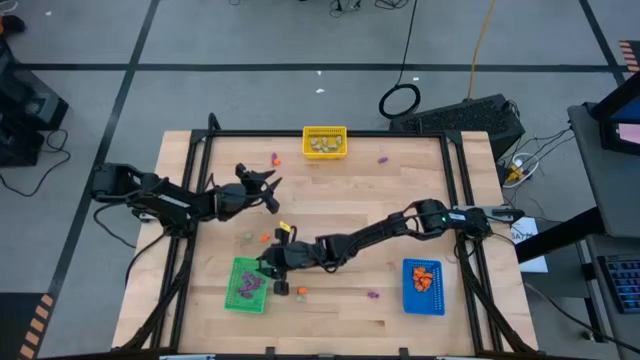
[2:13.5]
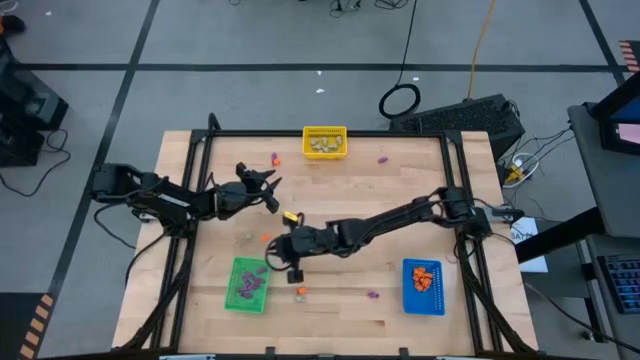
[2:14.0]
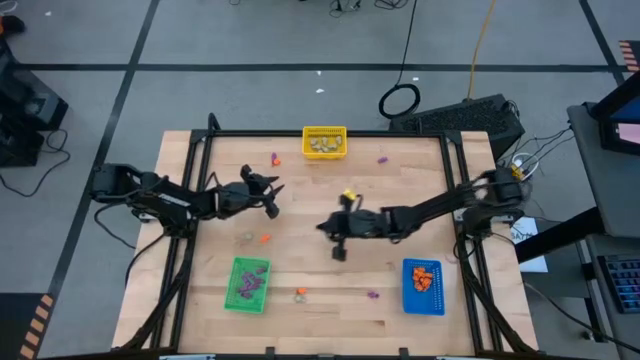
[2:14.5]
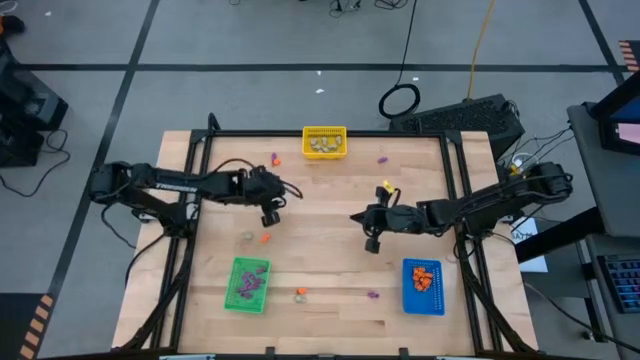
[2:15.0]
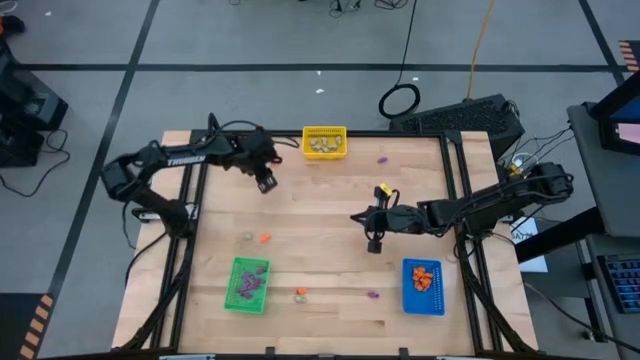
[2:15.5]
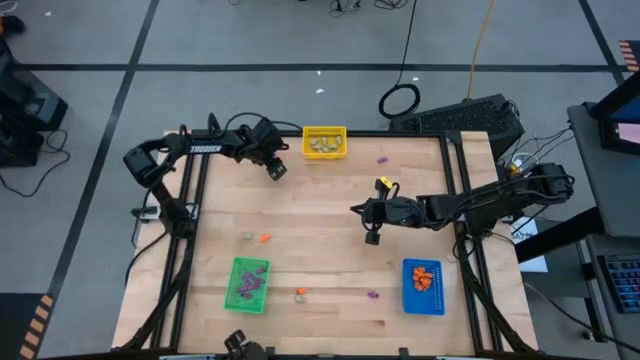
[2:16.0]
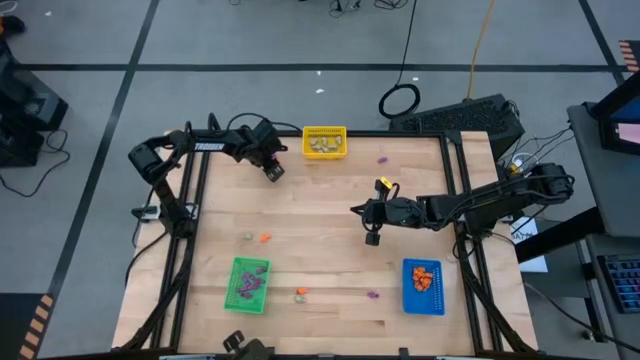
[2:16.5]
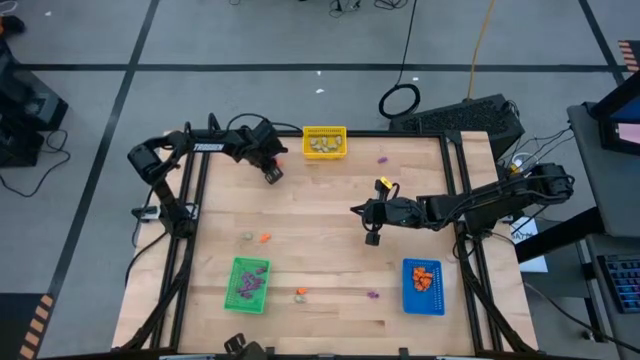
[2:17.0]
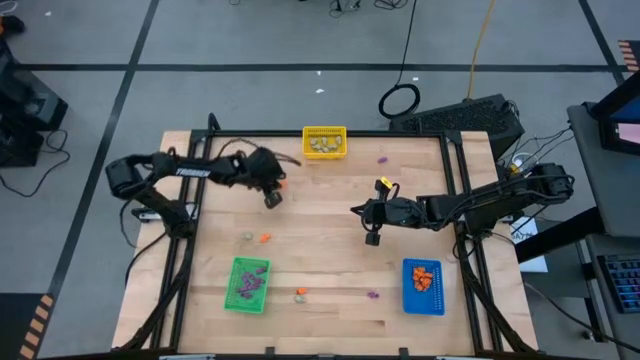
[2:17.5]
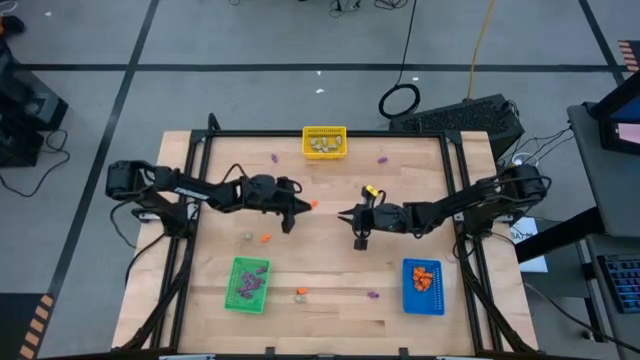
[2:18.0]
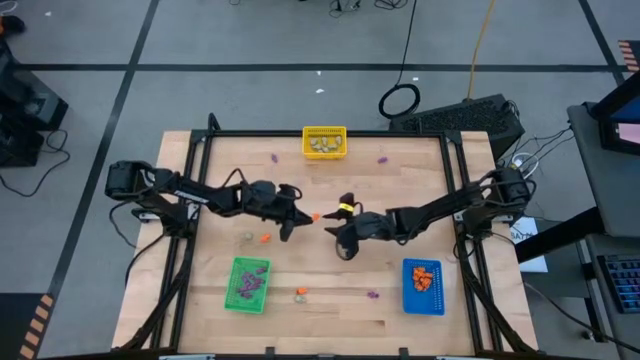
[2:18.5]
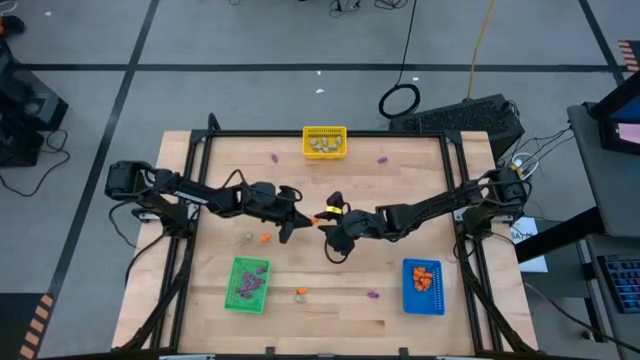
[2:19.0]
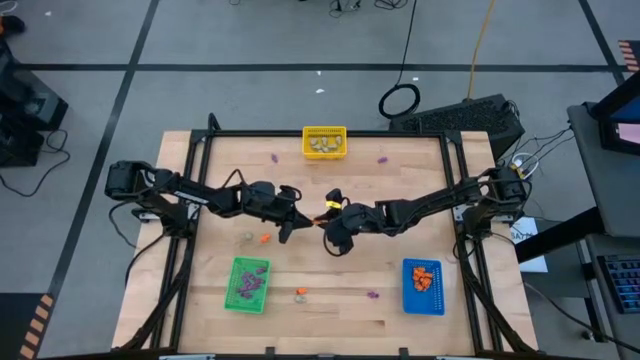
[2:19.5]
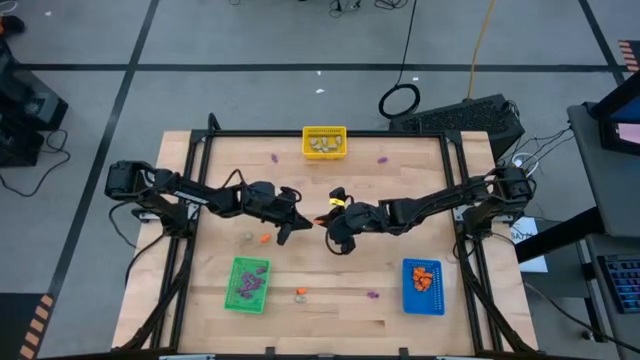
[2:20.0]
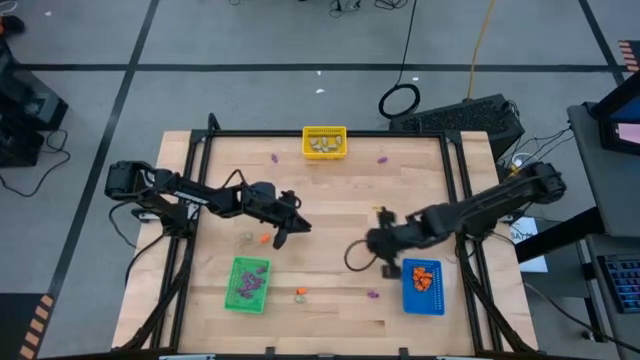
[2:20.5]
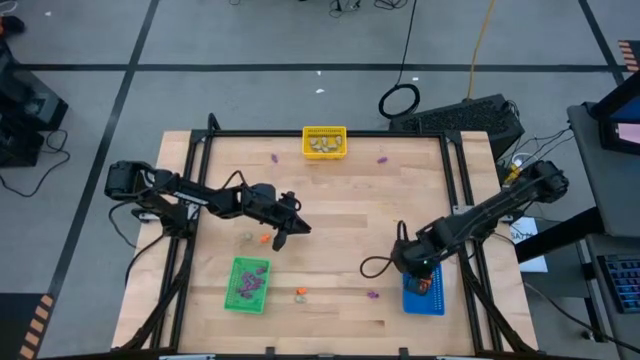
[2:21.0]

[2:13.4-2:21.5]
Task: Sort Halloween decoration
Put the orange skeleton toy into the blue bin

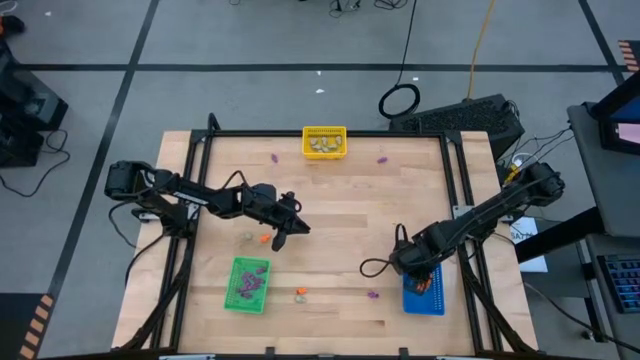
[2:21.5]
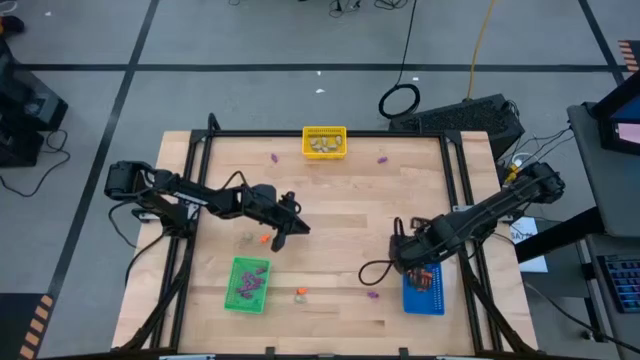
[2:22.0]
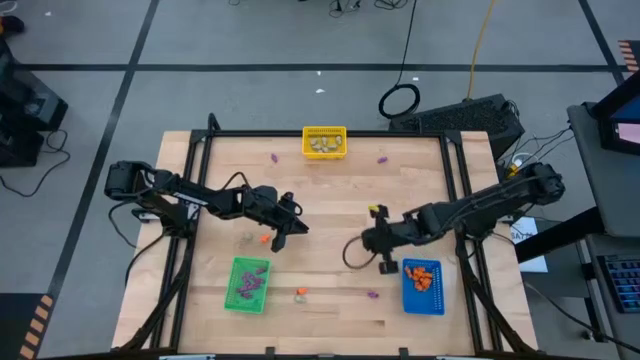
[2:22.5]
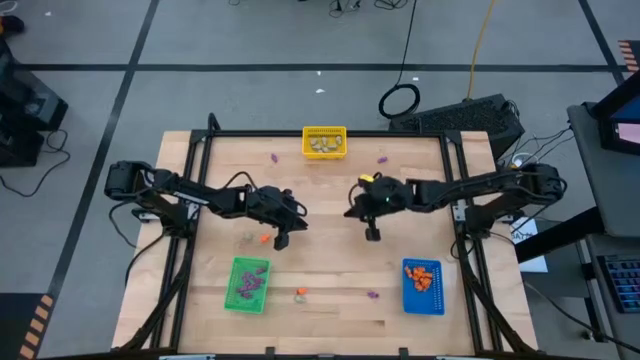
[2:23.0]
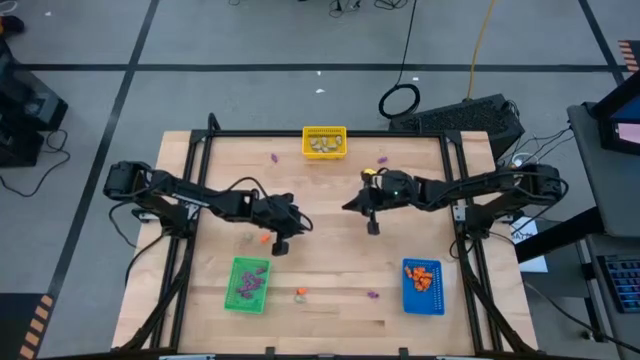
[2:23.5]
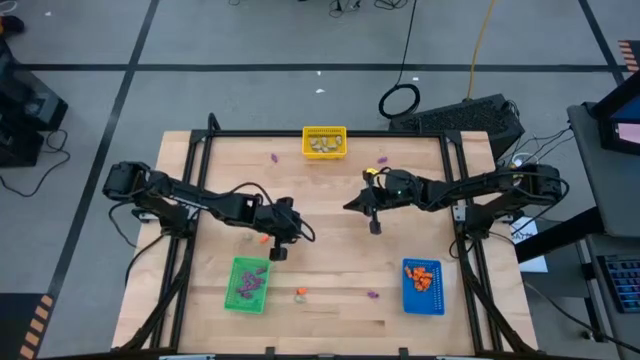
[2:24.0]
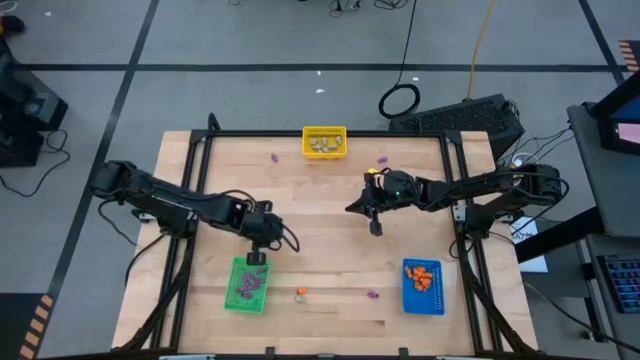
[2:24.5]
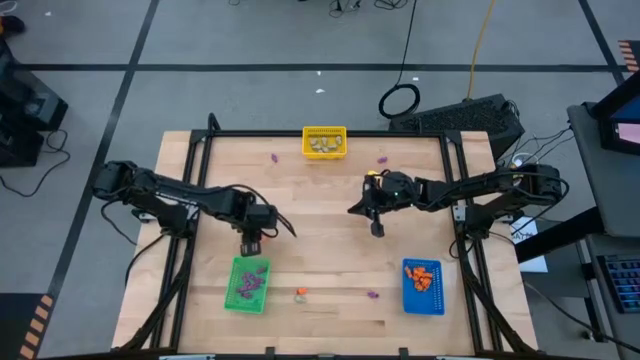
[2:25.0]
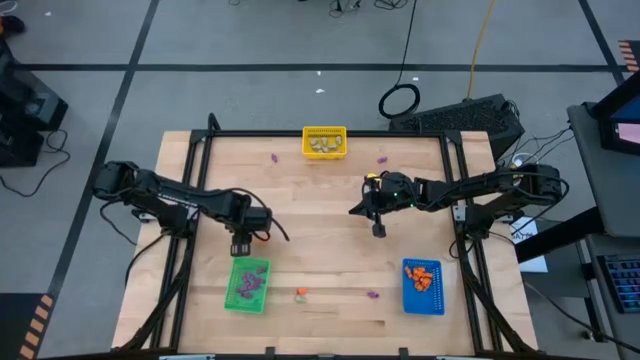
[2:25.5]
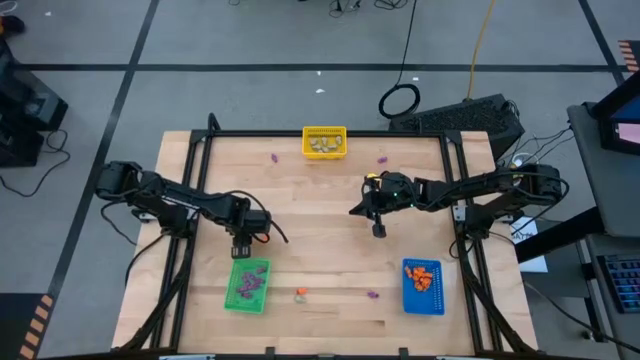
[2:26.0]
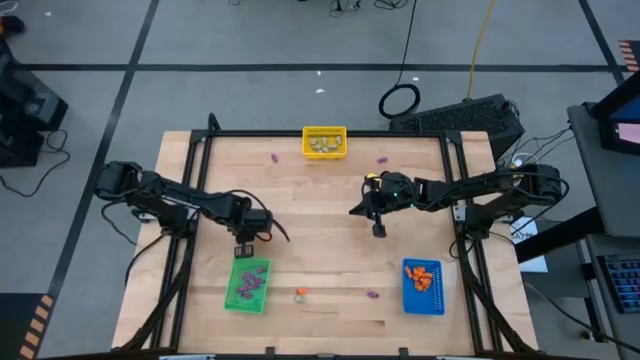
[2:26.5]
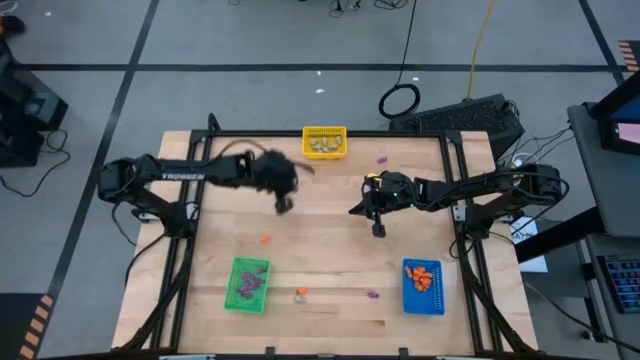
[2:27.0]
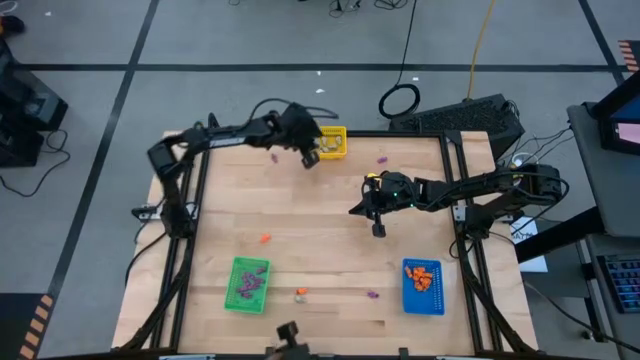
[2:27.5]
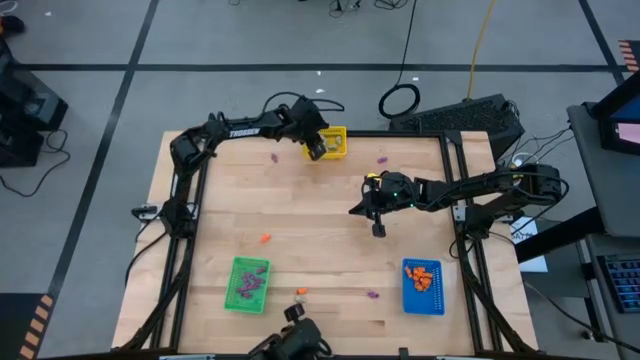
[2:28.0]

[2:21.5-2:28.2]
Put the gray skull toy into the yellow bin

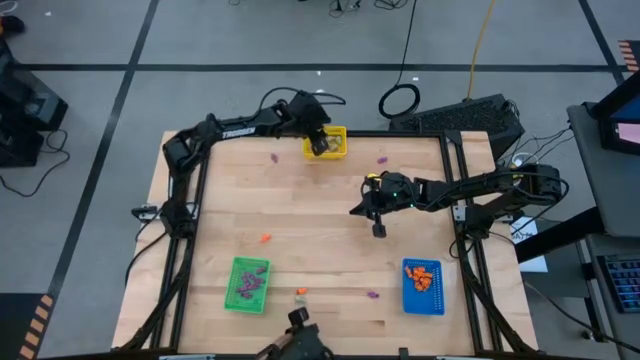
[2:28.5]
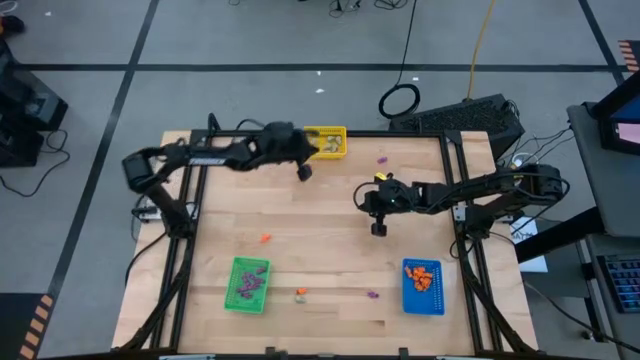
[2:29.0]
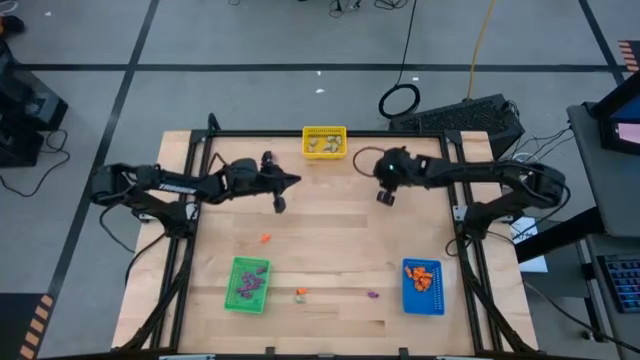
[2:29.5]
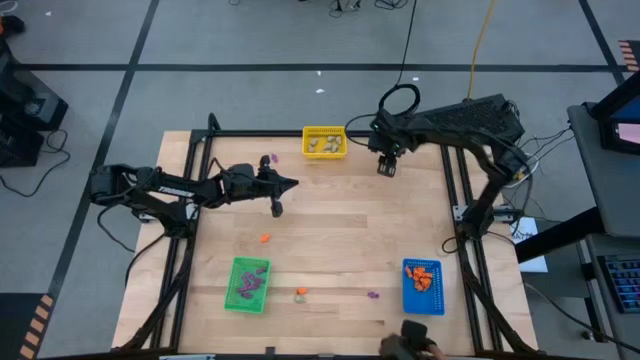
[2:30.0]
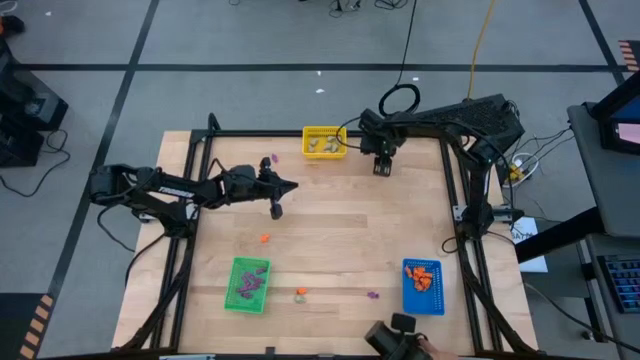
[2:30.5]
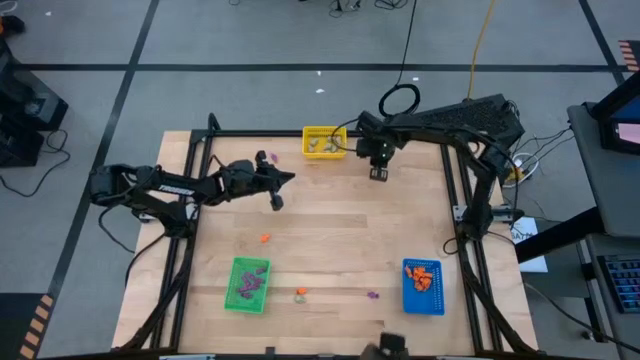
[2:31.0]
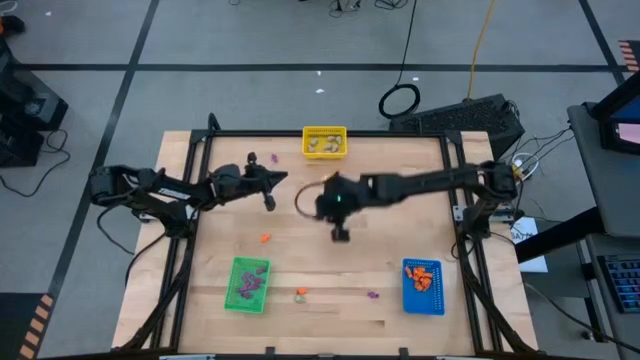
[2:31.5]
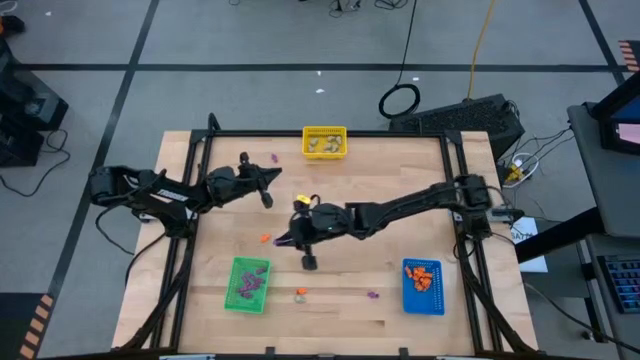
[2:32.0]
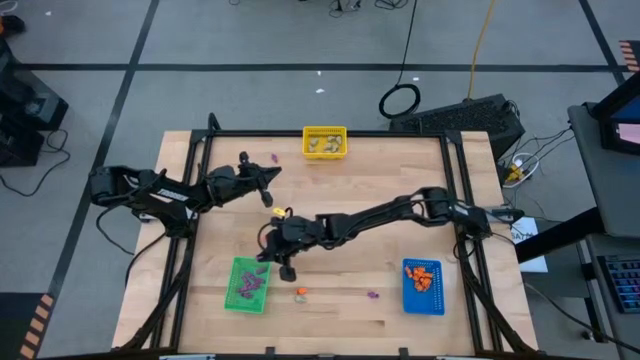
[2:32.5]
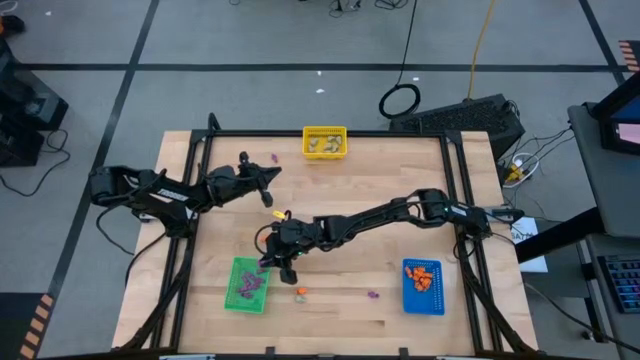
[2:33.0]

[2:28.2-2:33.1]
Put the purple skeleton toy into the green bin
